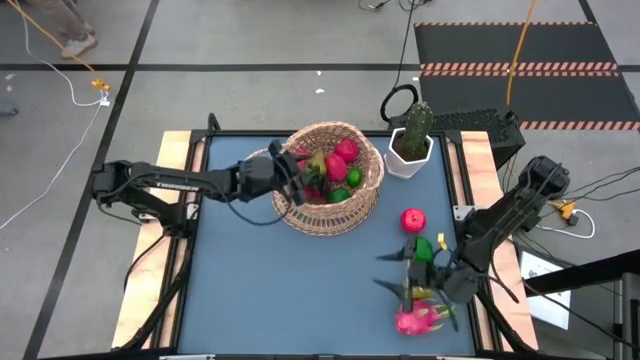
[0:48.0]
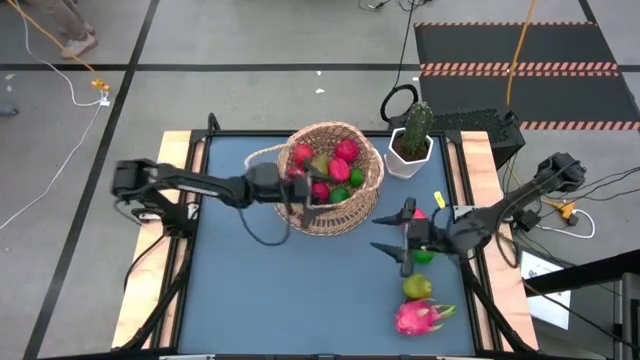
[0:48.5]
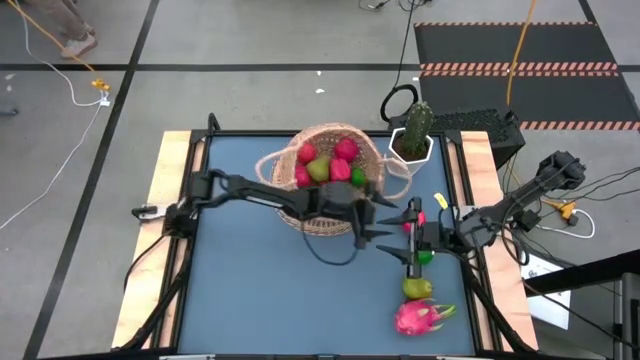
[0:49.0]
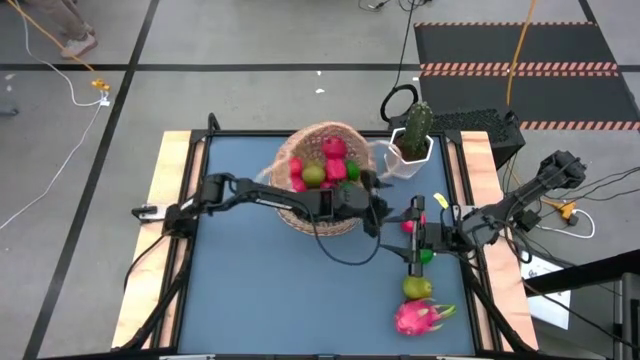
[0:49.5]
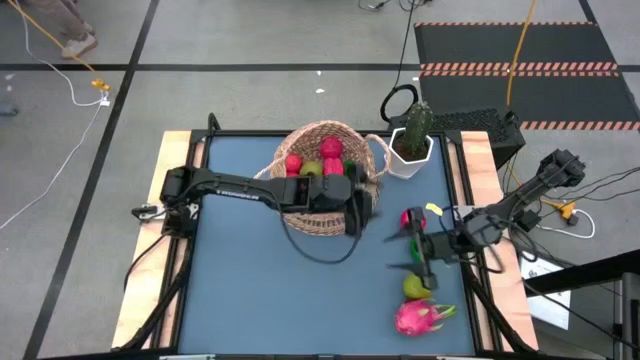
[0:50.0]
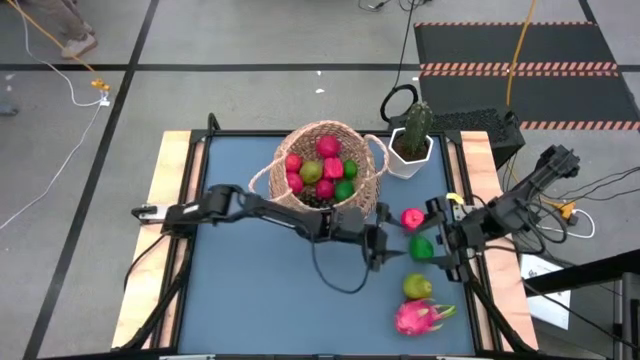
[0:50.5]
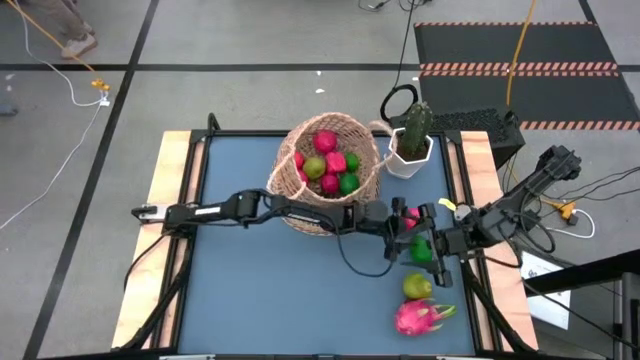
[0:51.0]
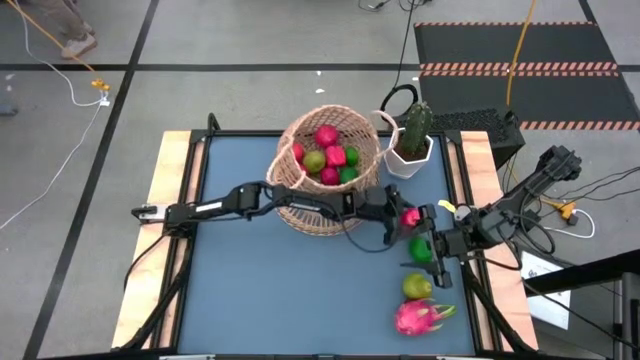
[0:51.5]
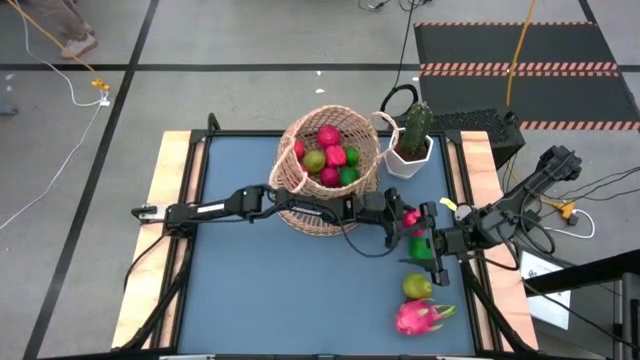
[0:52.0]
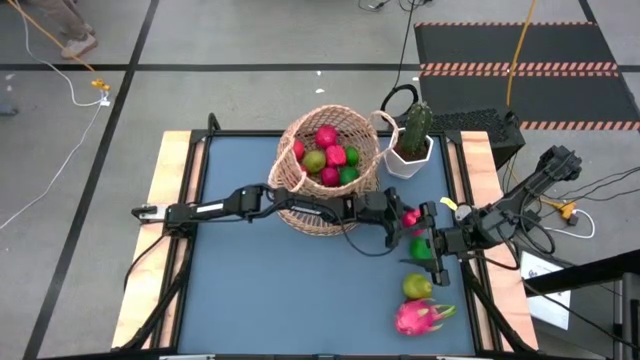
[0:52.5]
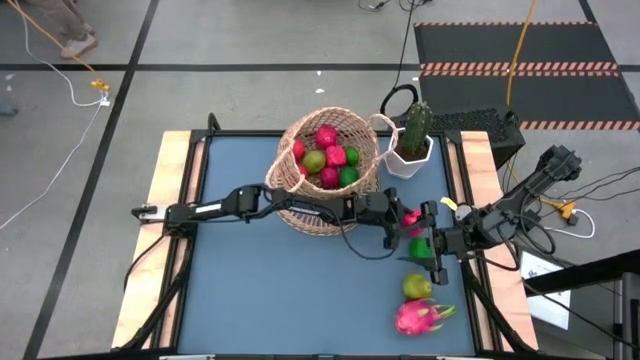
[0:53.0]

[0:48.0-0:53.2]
Task: Build produce basket
Put the red apple into the brown basket

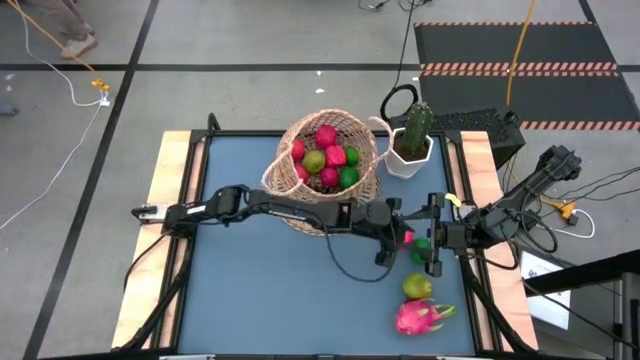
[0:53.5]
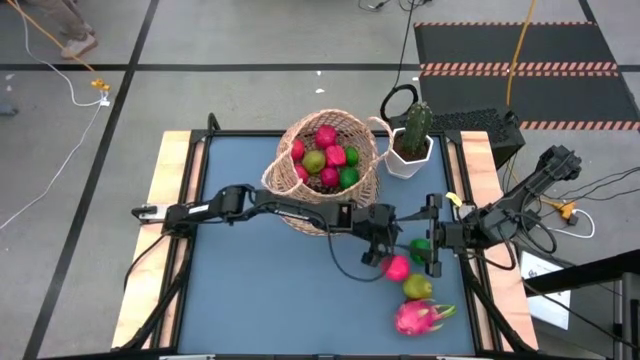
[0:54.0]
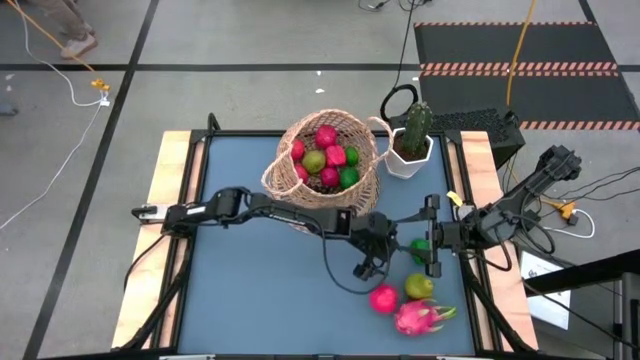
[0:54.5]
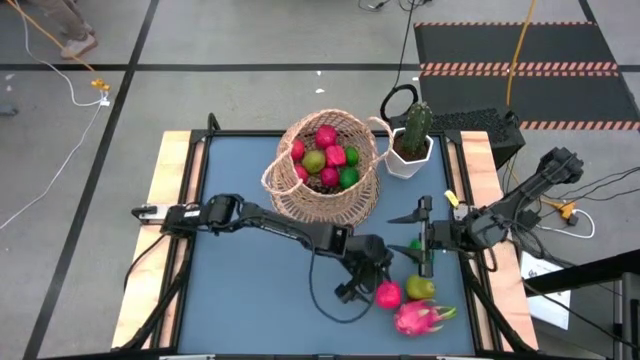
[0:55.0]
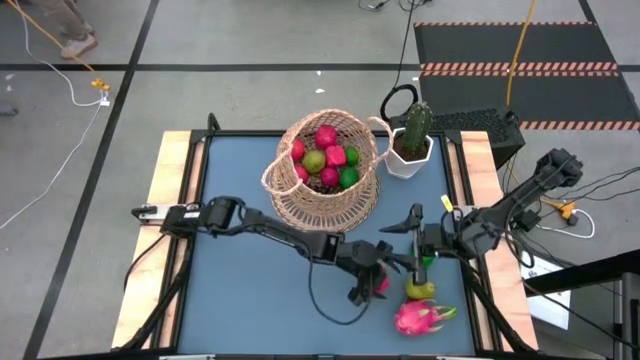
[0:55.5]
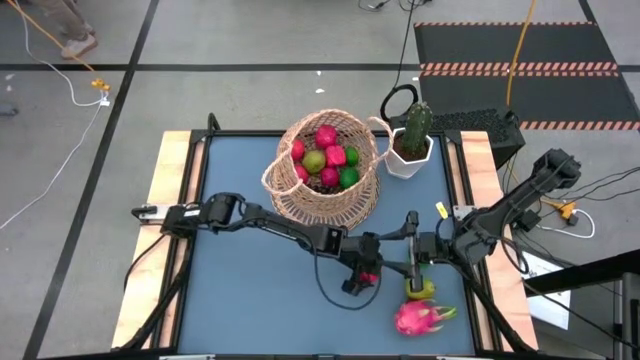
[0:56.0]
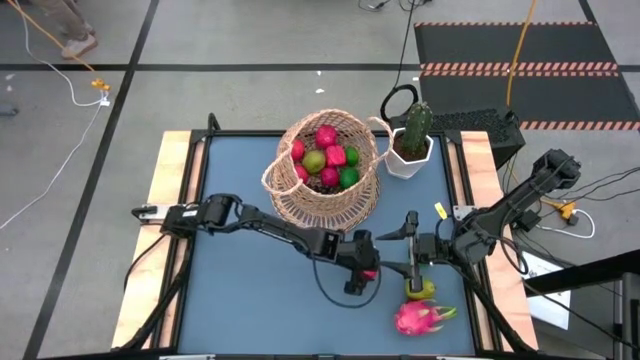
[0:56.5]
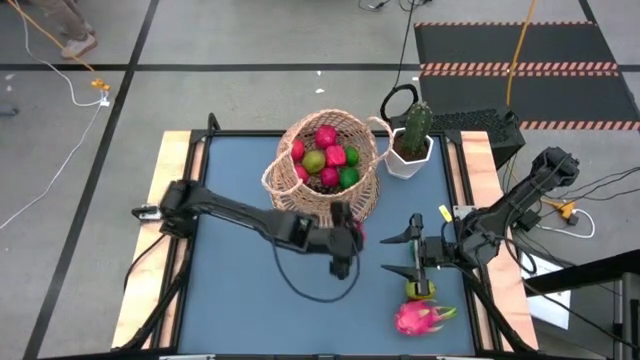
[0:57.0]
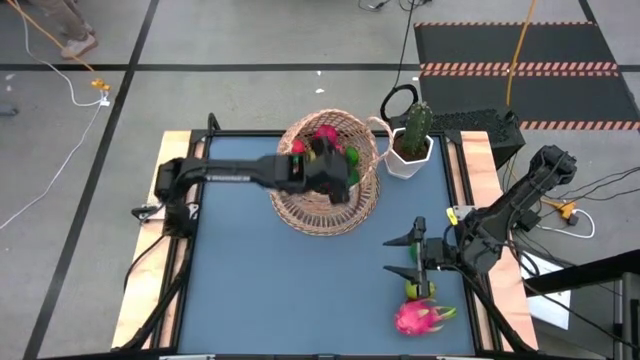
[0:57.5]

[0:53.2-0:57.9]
Put the red apple into the brown basket

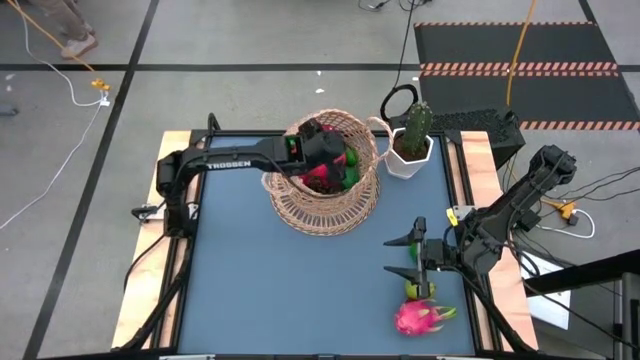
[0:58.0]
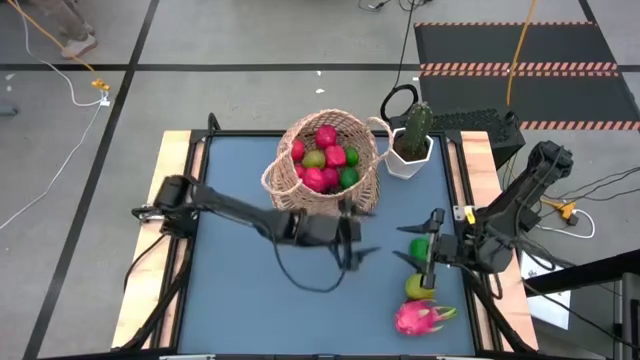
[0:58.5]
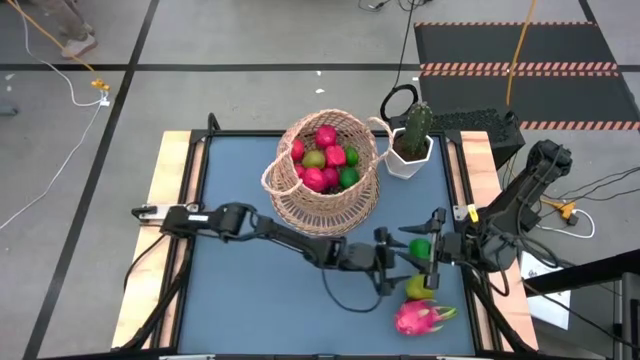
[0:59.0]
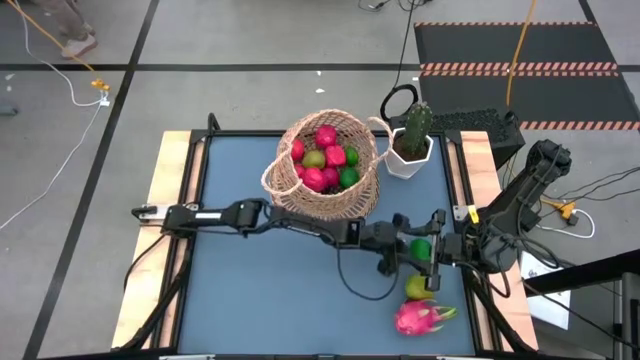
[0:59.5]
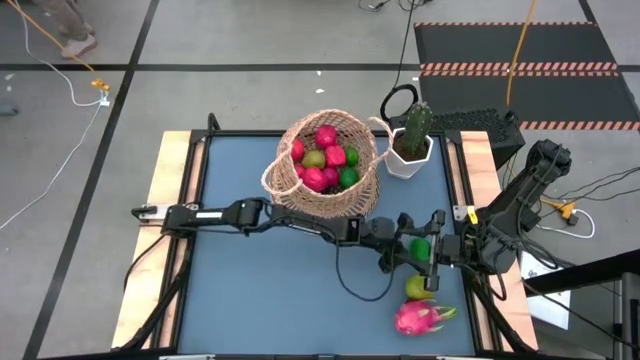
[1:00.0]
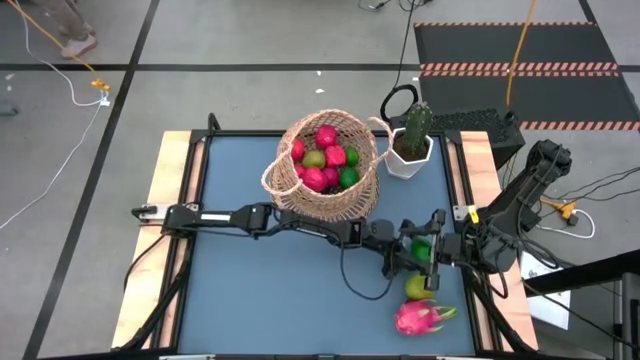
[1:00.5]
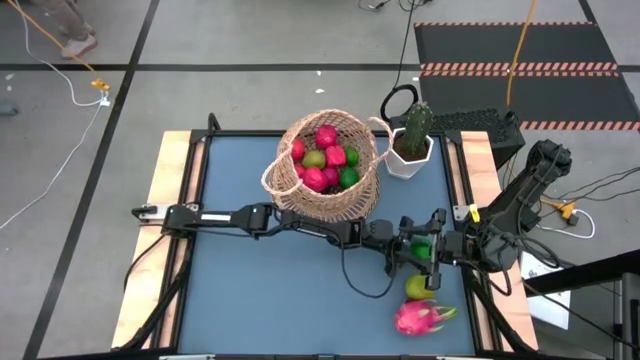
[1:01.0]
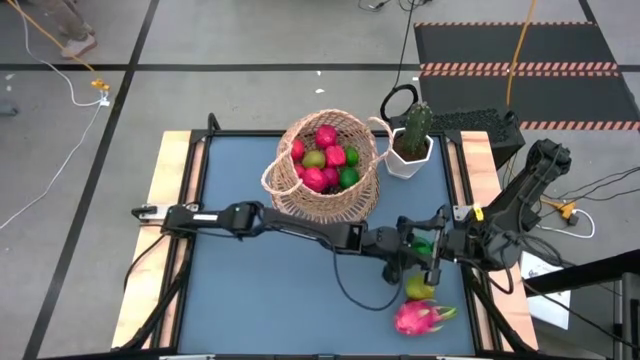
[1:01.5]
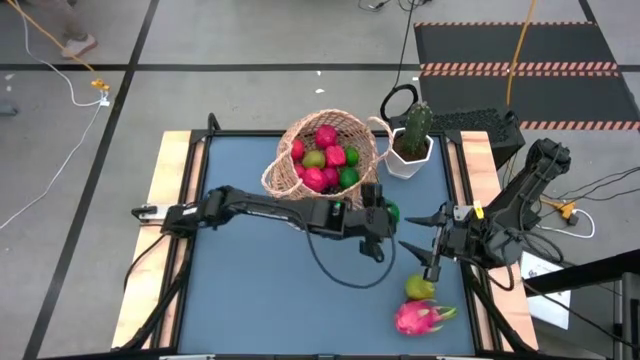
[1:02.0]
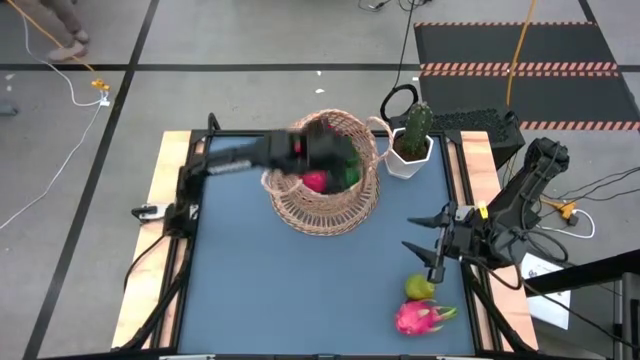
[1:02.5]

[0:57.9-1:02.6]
Put the green lime into the brown basket

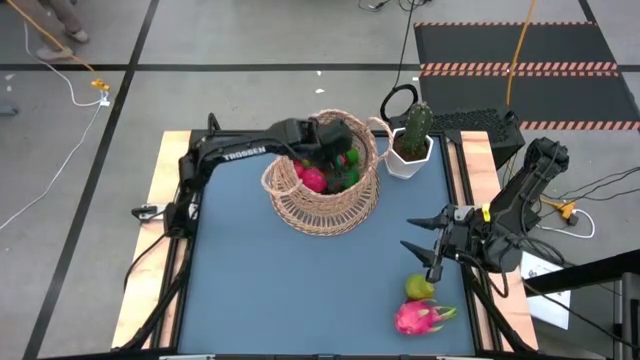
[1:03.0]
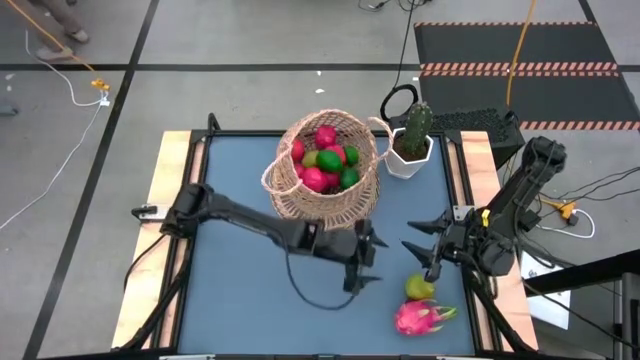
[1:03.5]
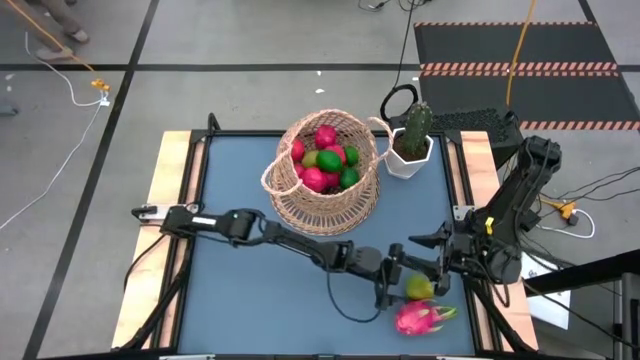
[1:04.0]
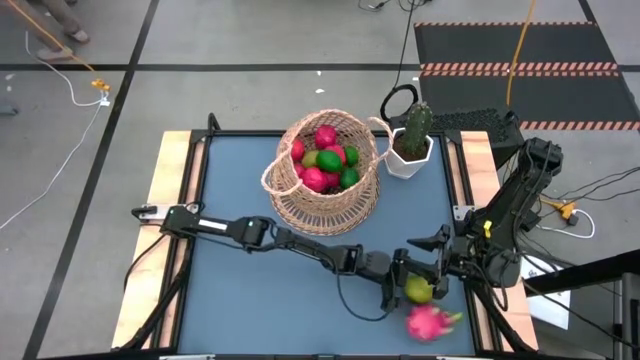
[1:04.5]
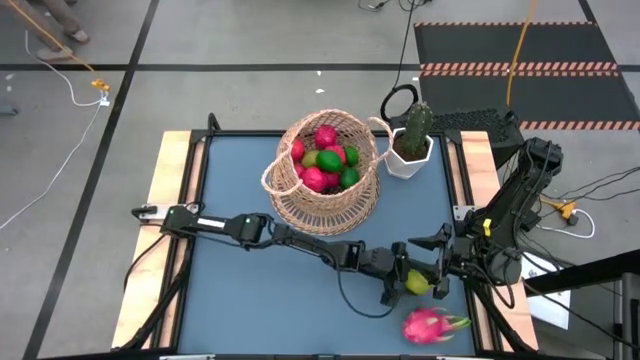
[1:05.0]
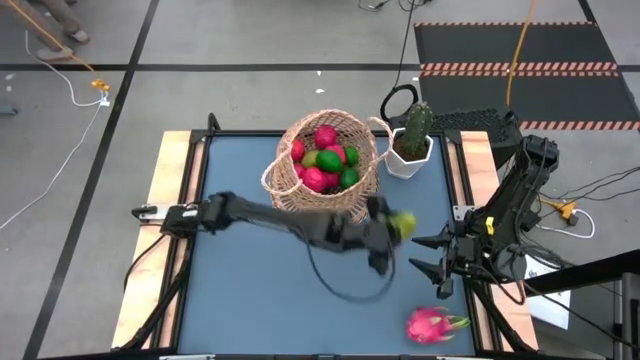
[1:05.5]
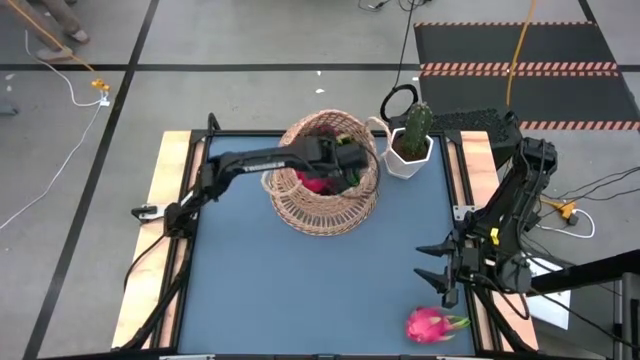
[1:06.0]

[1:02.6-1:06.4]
Put the green pear into the brown basket

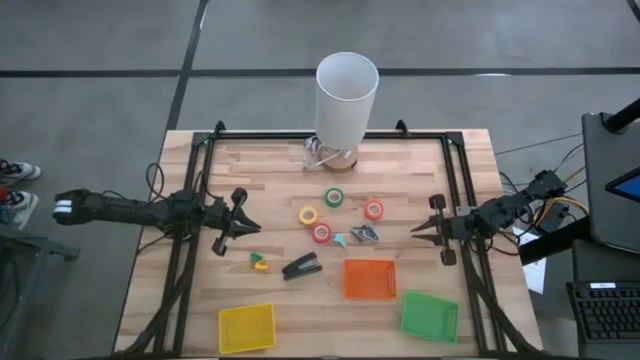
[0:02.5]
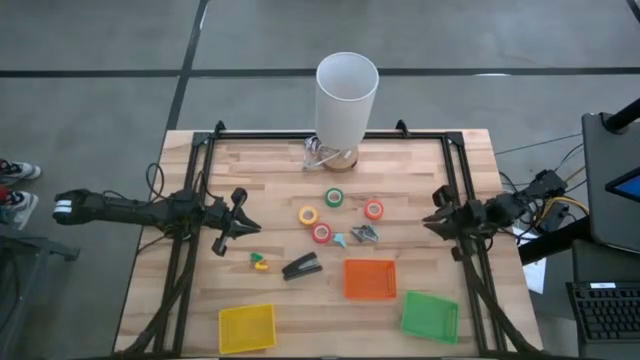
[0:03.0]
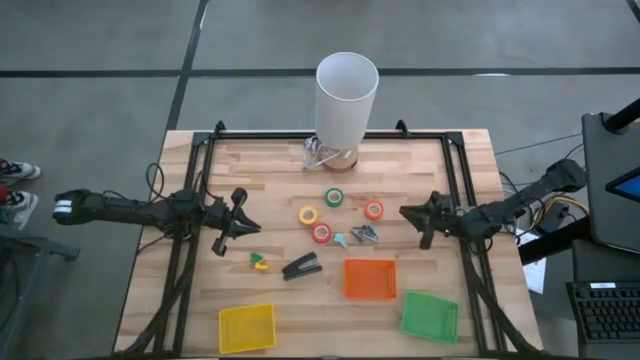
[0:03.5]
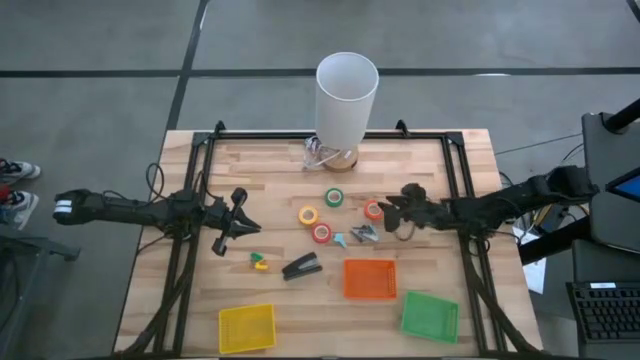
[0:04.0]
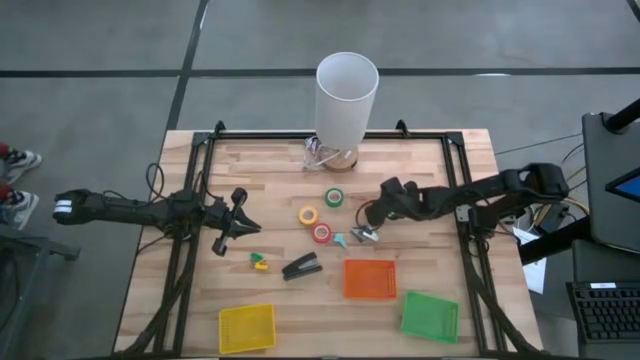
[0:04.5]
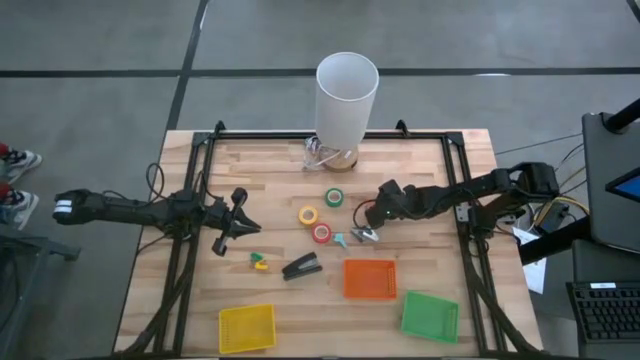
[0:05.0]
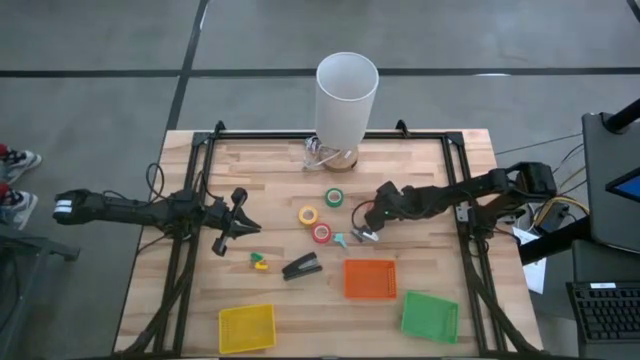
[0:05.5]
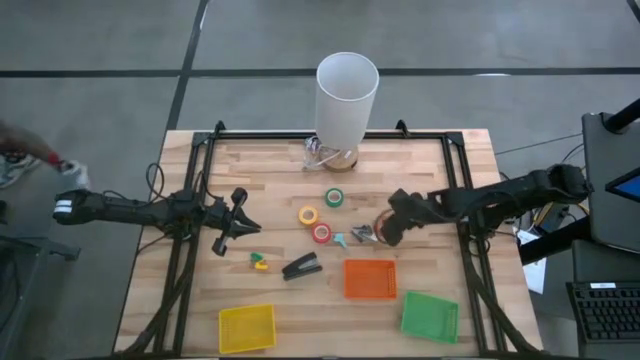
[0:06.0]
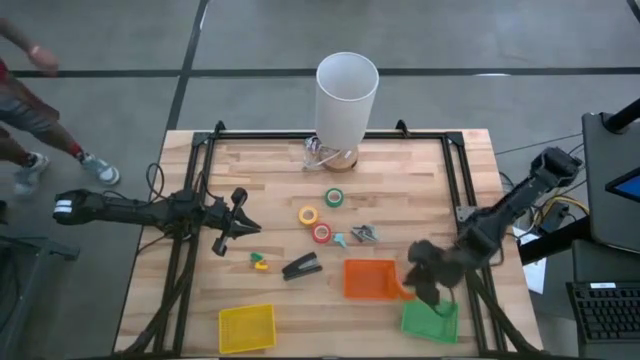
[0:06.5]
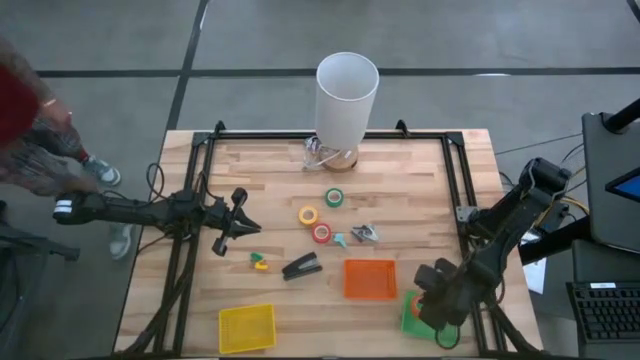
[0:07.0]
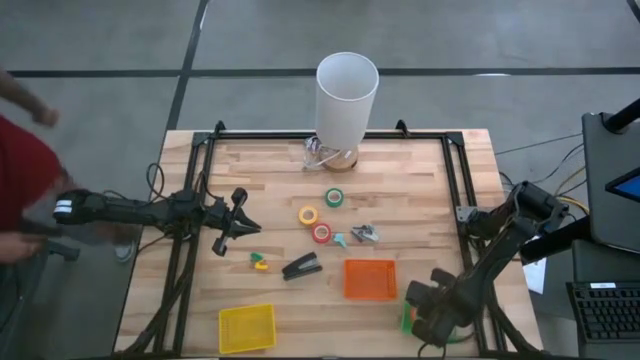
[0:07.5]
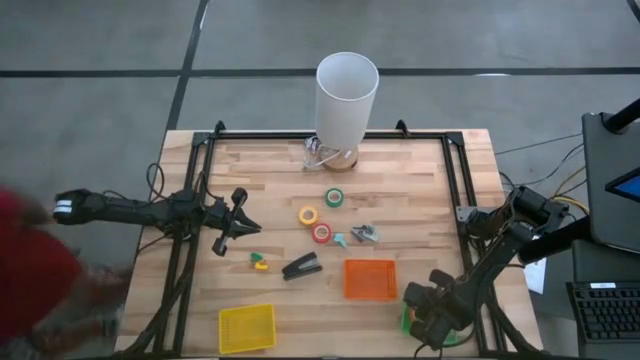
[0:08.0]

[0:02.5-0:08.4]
Task: Pick and place Stapler, Stapler remover, tape
Put the orange tape into the green basket
